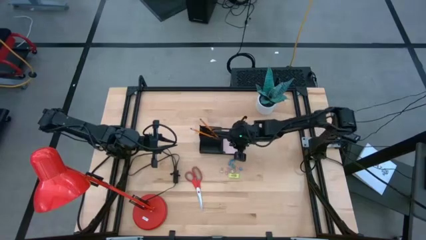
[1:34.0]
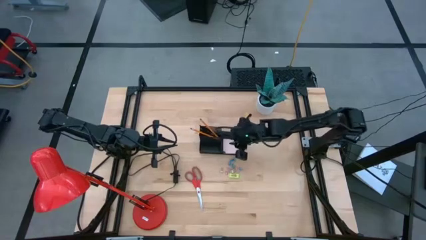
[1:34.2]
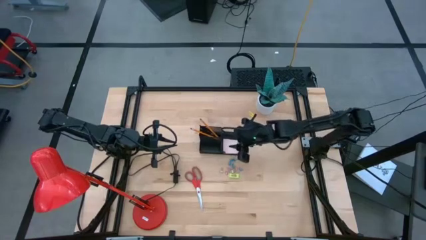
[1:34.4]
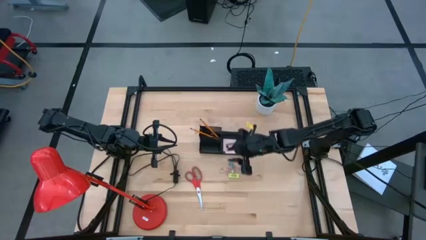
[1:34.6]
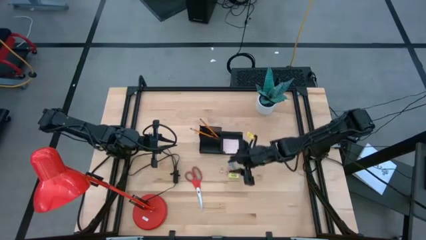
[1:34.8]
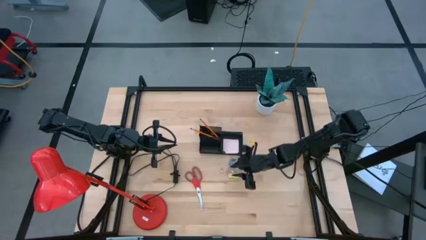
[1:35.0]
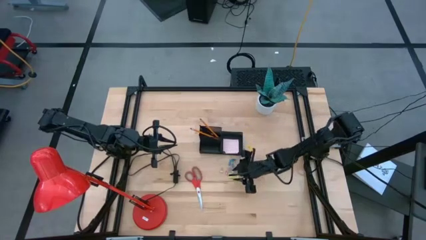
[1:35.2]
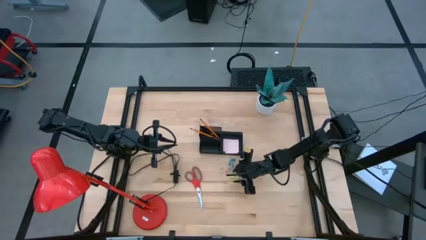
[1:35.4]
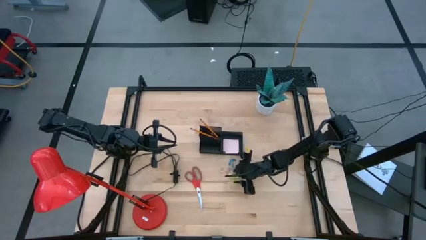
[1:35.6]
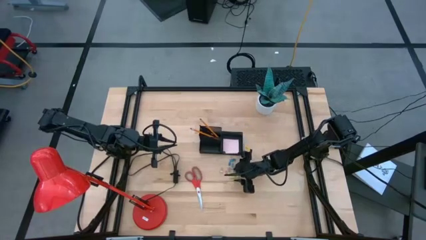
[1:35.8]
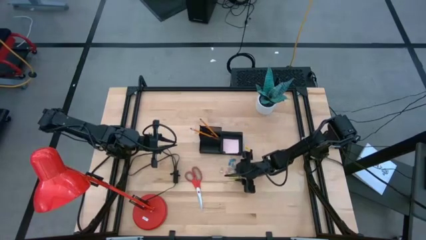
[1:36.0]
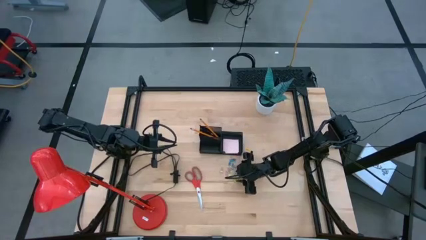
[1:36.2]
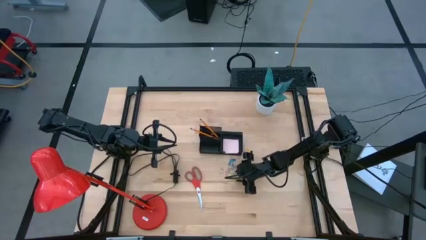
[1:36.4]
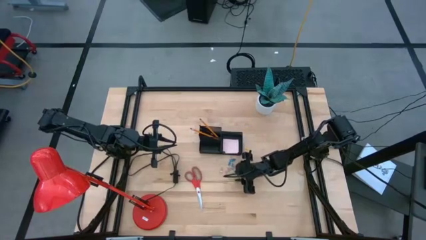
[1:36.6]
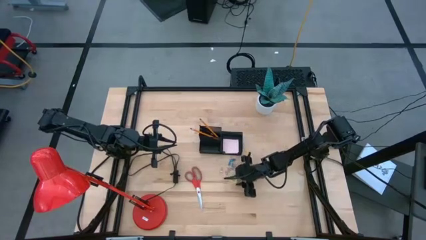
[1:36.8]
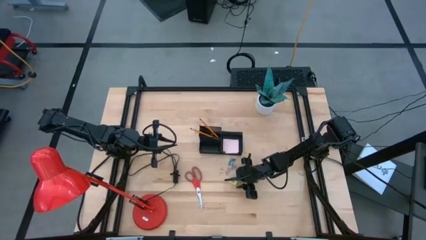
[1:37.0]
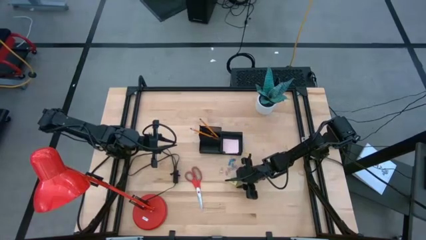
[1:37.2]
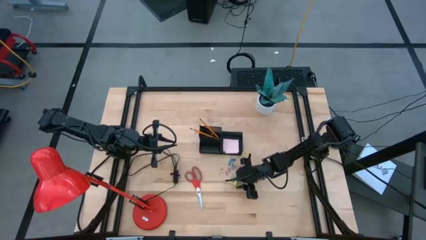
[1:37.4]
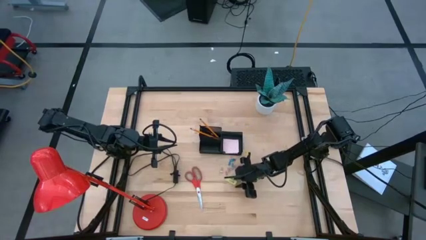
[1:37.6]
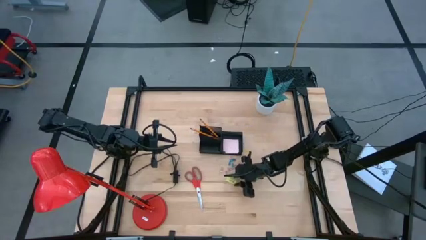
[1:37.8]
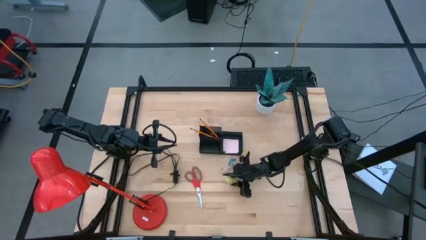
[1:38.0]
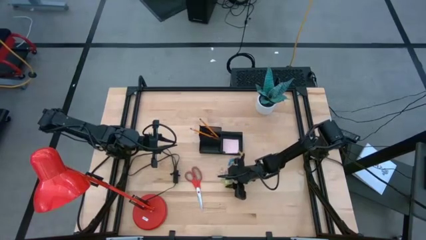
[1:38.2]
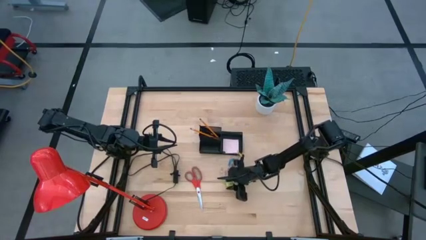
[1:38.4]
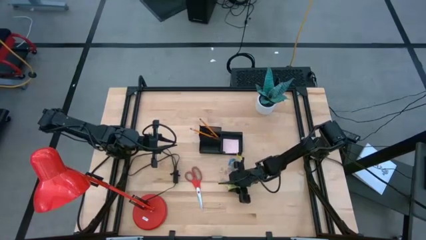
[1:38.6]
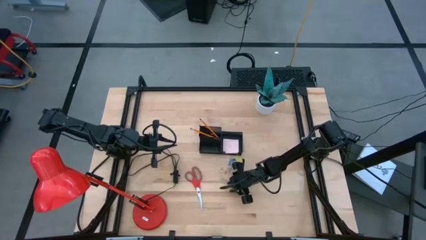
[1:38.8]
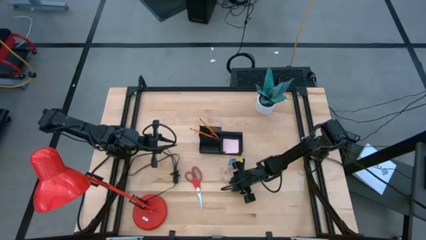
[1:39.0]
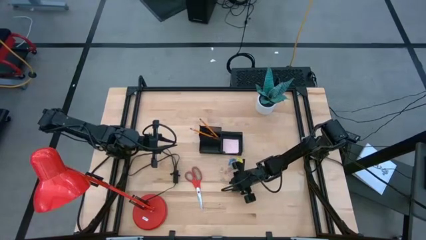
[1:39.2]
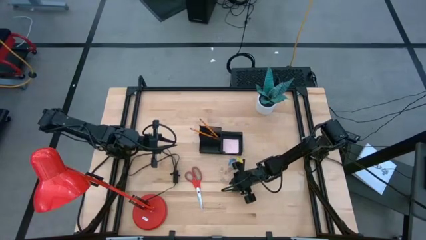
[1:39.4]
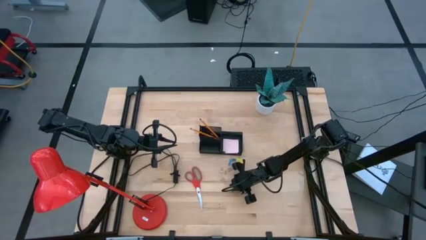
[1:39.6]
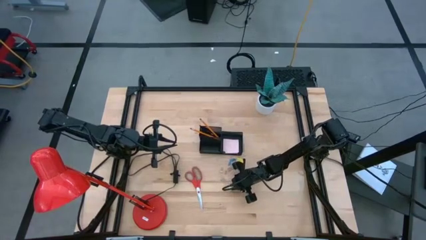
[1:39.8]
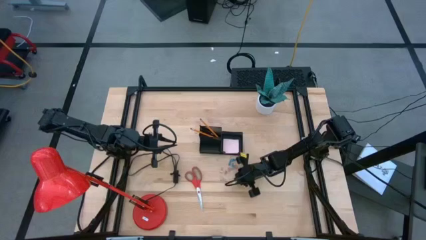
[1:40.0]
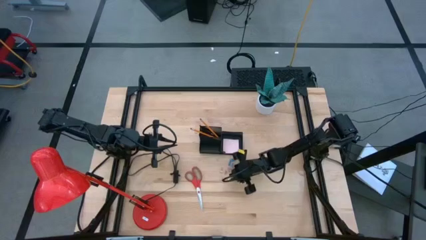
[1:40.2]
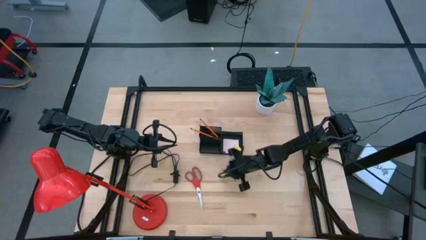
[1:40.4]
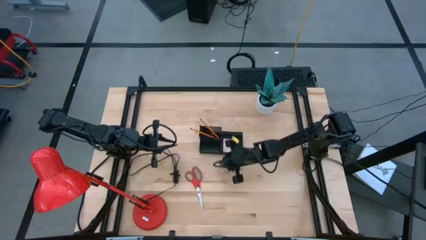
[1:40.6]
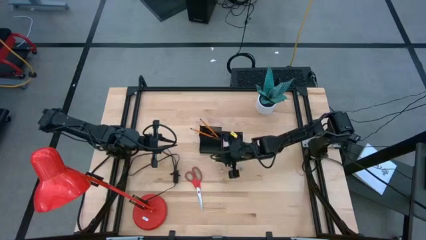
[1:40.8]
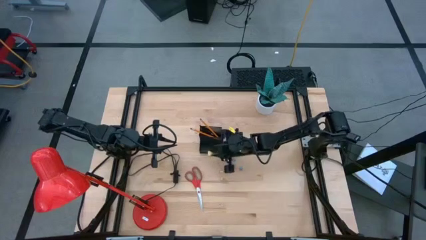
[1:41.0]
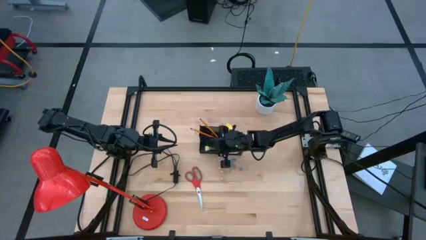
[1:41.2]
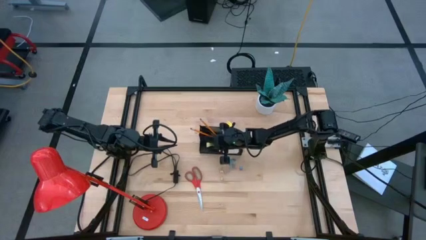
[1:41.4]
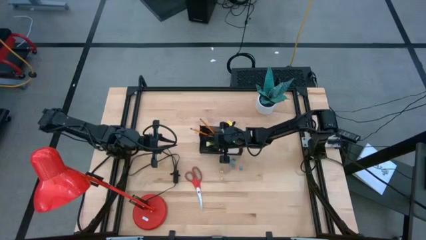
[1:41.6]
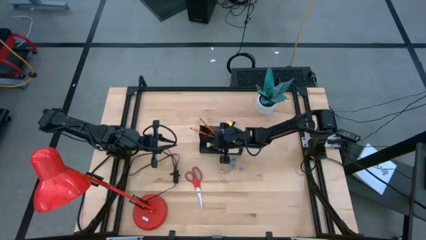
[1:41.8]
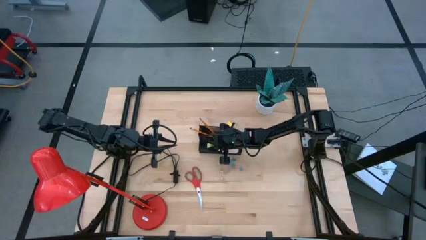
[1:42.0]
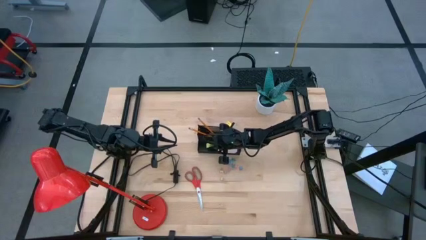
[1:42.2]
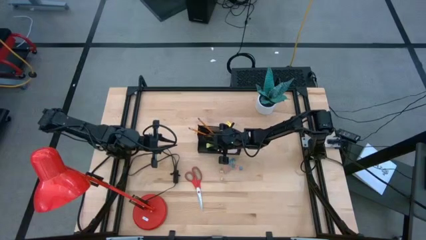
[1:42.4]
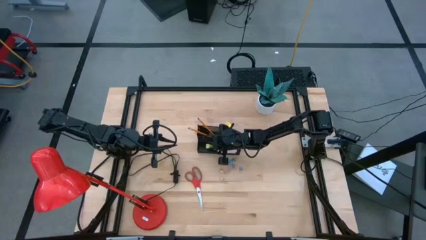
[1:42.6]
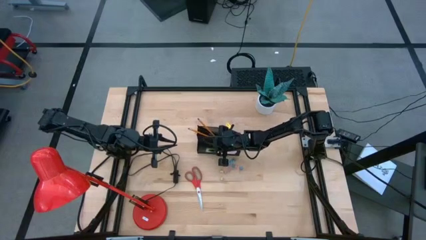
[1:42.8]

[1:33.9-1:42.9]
Task: Pick and place office supplies into organizer
Put the green eraser into the black desk organizer

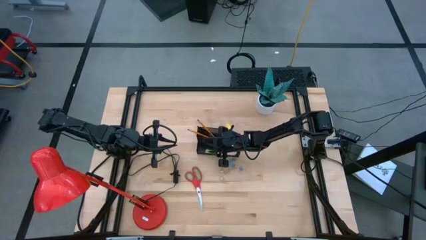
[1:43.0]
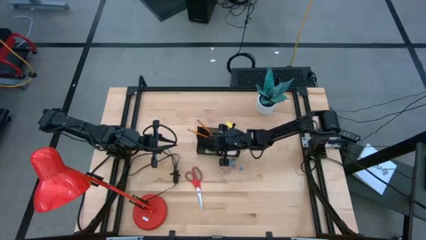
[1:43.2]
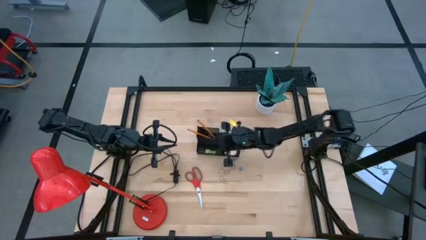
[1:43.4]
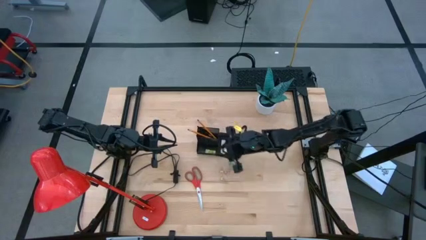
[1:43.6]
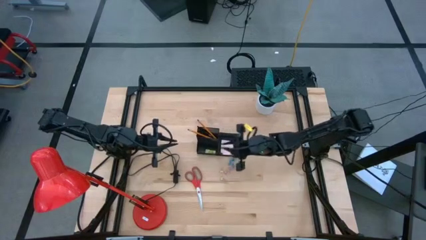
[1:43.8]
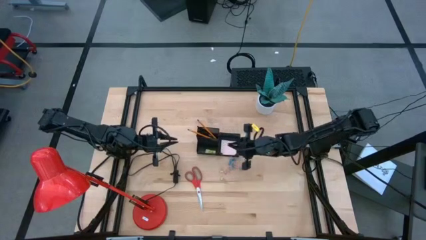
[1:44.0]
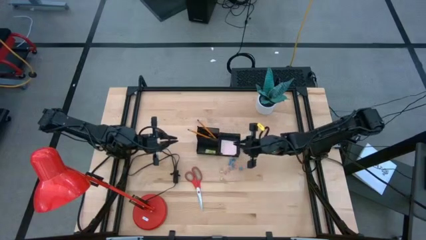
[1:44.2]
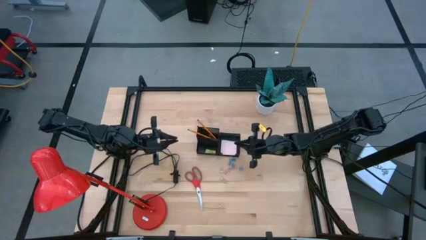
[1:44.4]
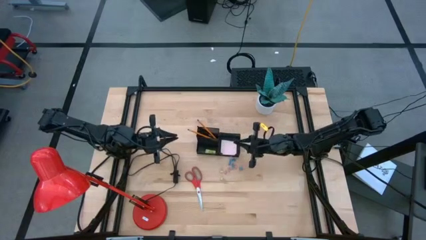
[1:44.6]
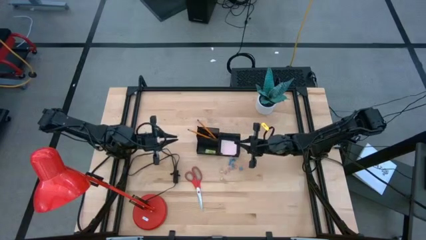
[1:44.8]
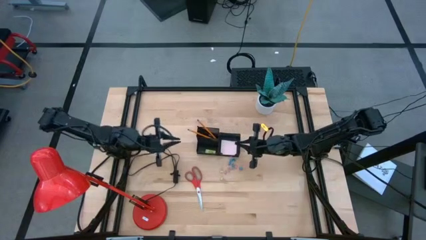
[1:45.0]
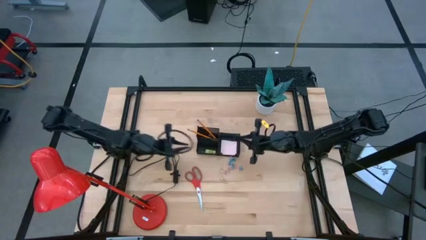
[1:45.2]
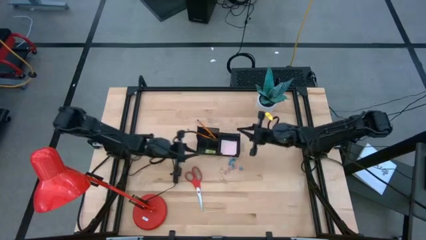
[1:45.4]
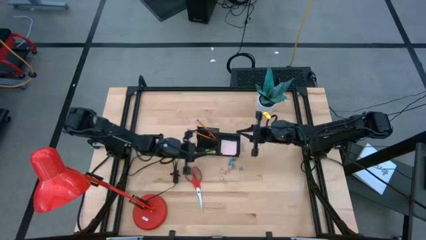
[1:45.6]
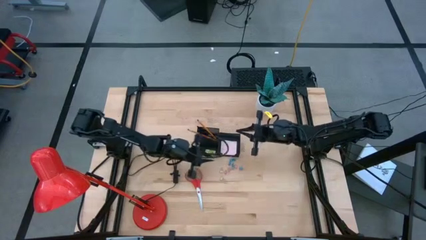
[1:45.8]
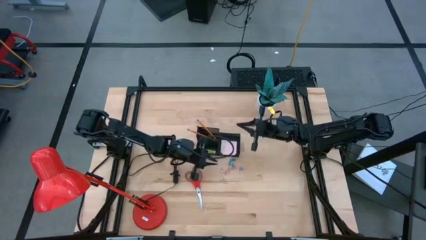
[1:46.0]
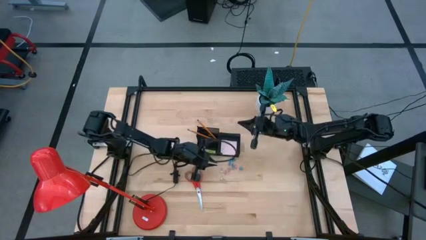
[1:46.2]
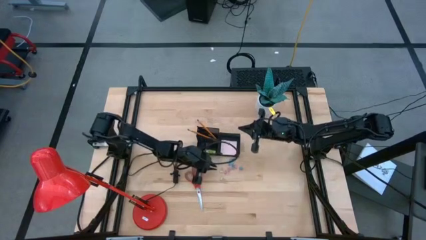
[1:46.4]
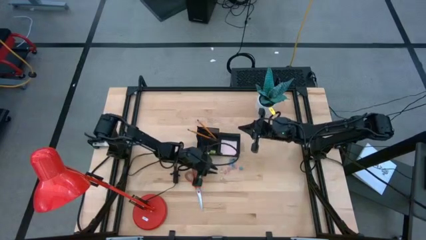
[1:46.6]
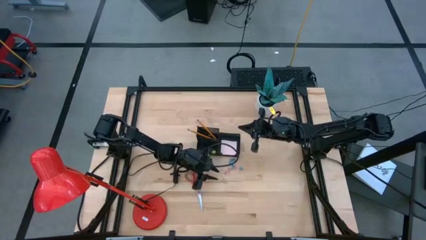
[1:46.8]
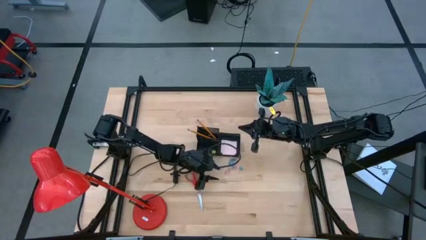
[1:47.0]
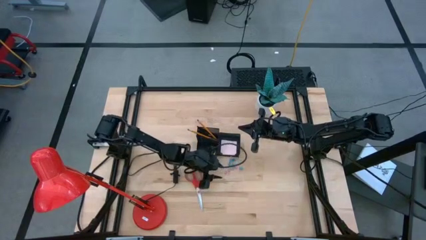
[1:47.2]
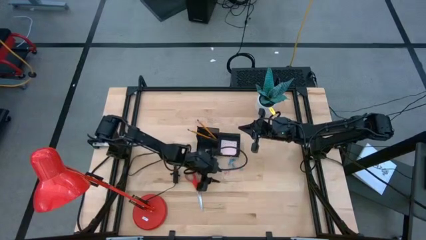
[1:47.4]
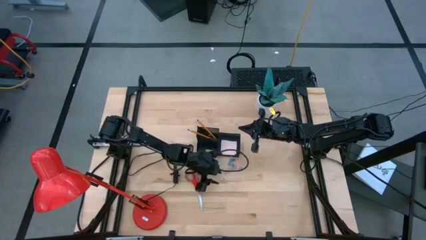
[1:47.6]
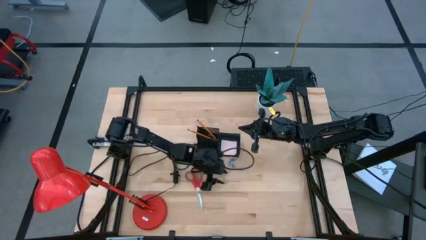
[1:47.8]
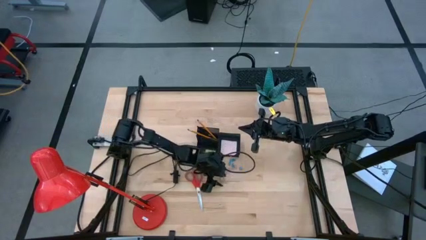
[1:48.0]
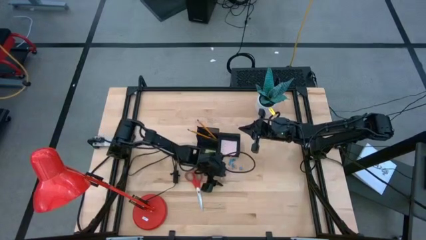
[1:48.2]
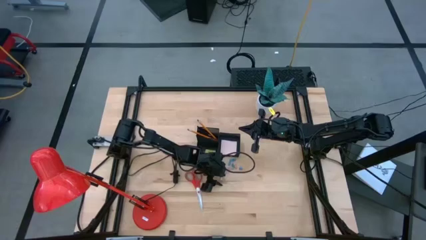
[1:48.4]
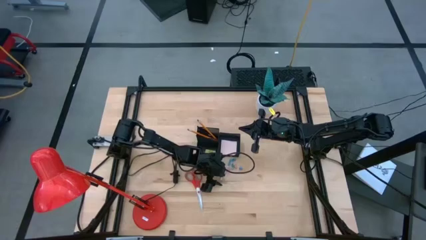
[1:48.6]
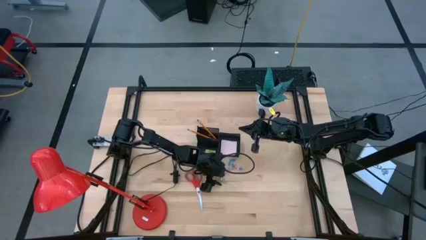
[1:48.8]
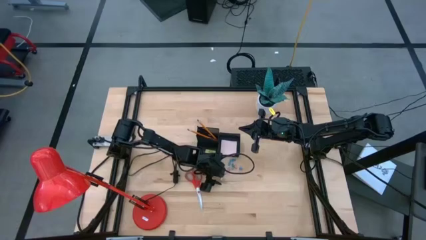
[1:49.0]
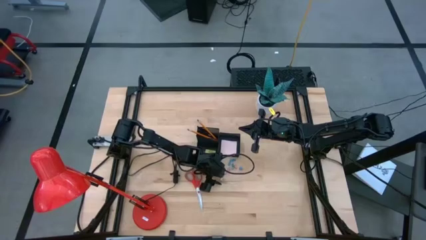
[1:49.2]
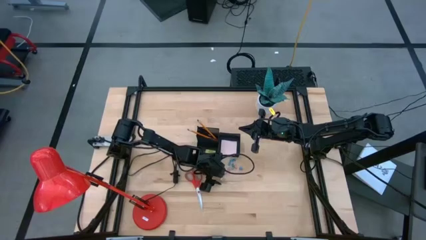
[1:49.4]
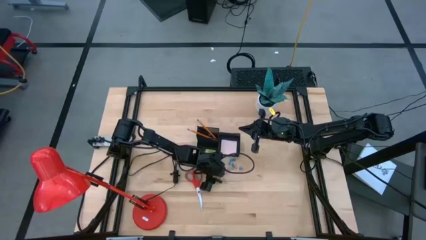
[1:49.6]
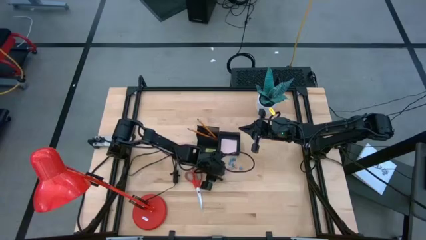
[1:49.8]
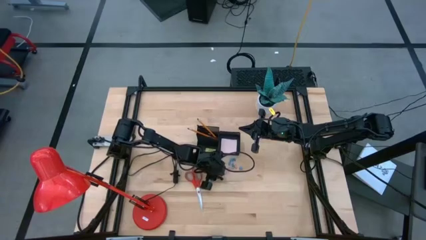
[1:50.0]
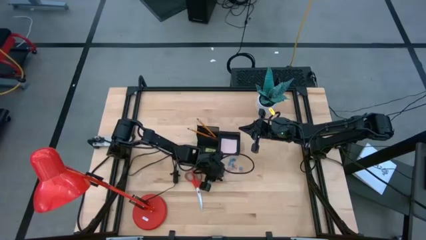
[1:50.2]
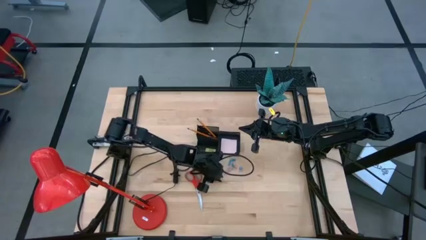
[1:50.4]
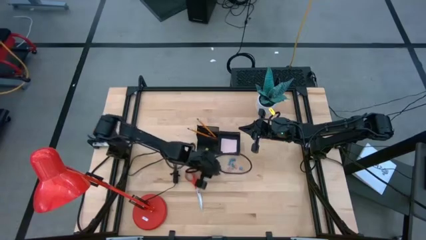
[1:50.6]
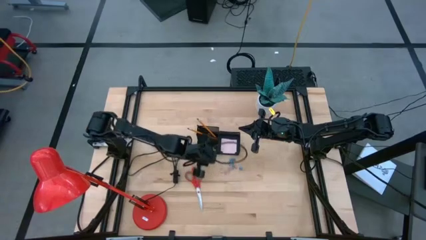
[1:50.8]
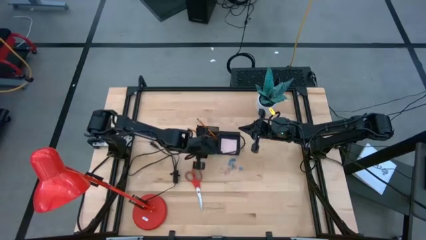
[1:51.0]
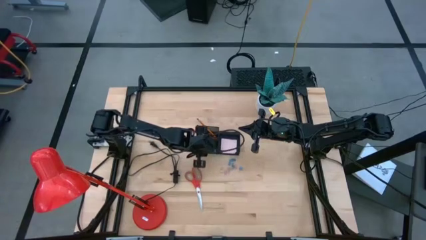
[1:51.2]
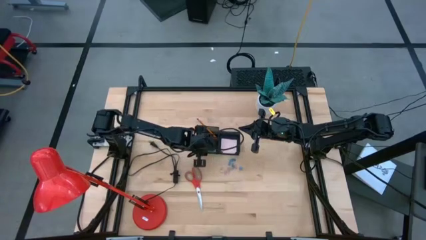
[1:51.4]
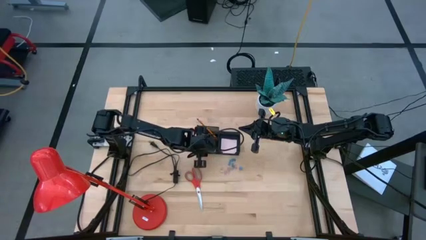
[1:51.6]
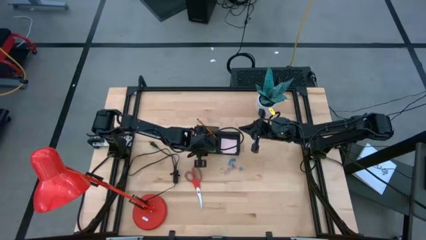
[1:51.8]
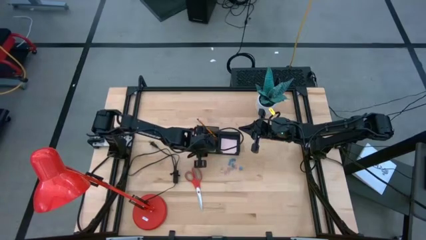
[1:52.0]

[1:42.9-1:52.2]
Put the green binder clip into the black desk organizer
